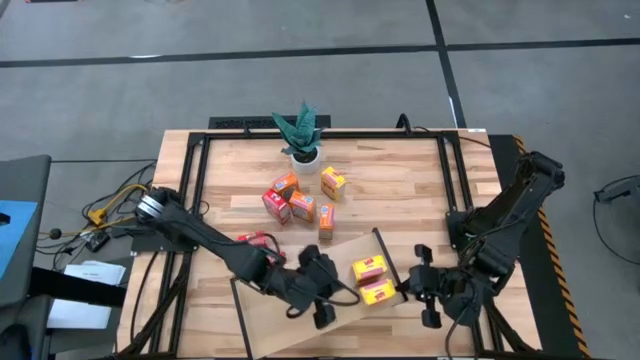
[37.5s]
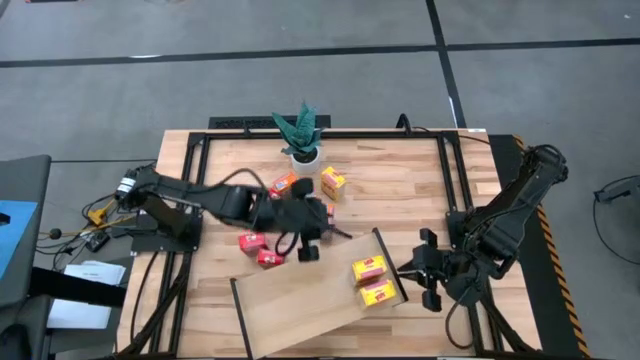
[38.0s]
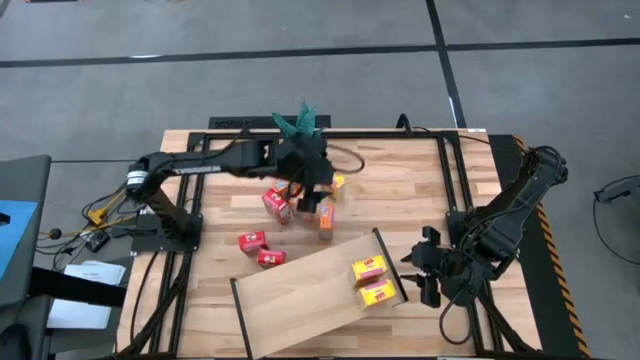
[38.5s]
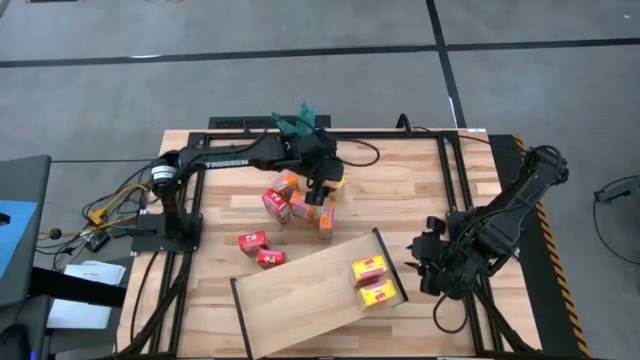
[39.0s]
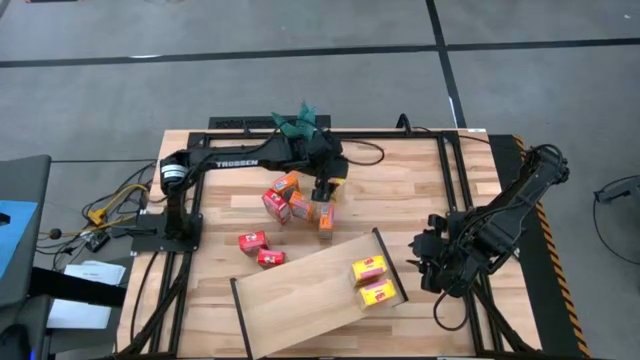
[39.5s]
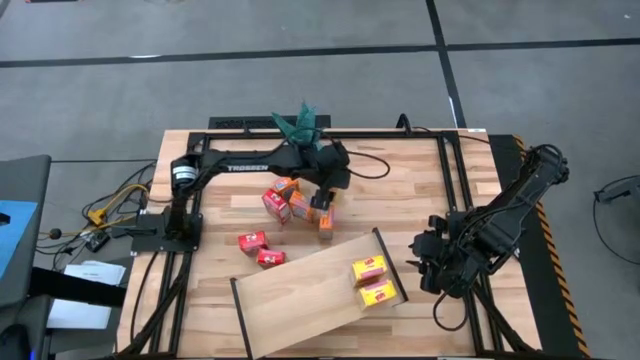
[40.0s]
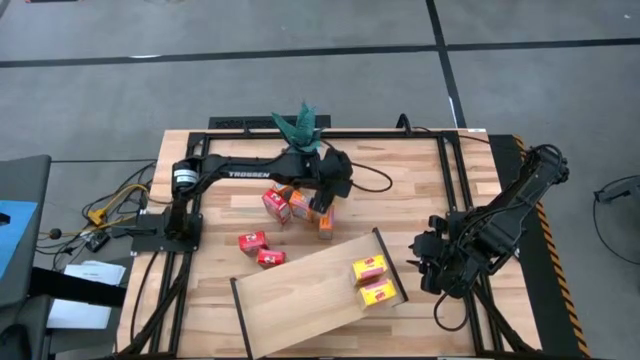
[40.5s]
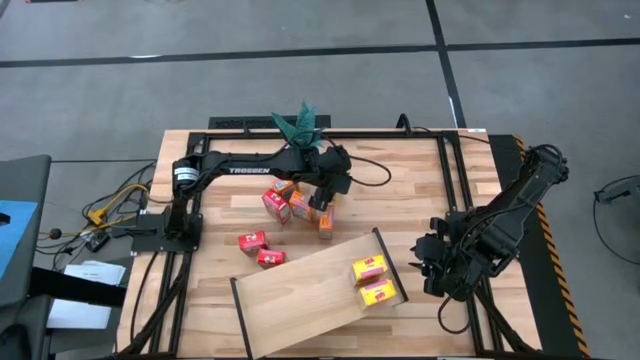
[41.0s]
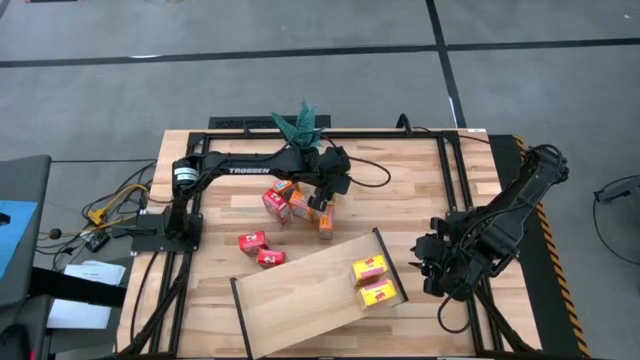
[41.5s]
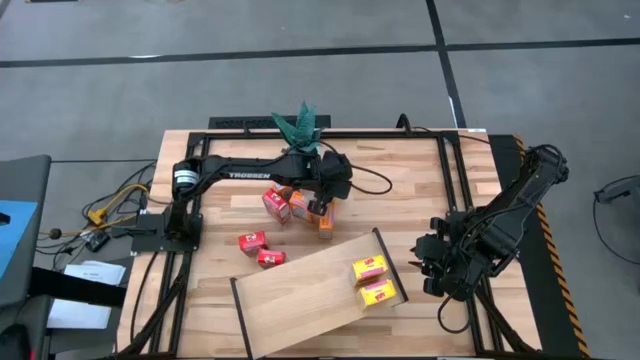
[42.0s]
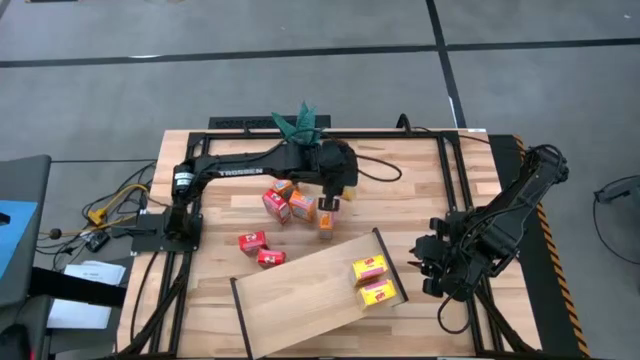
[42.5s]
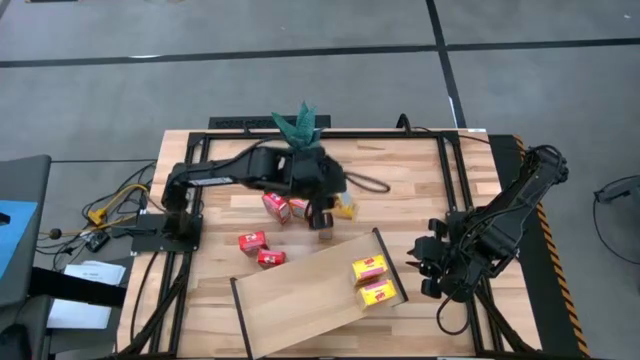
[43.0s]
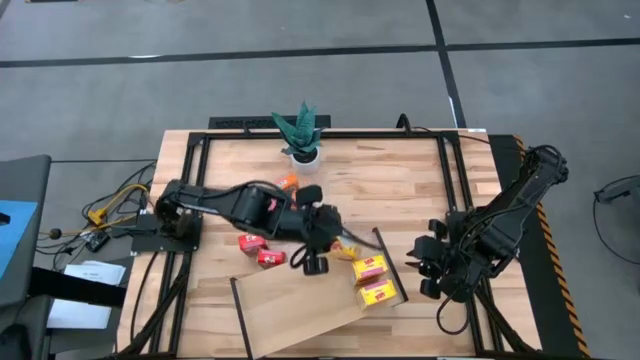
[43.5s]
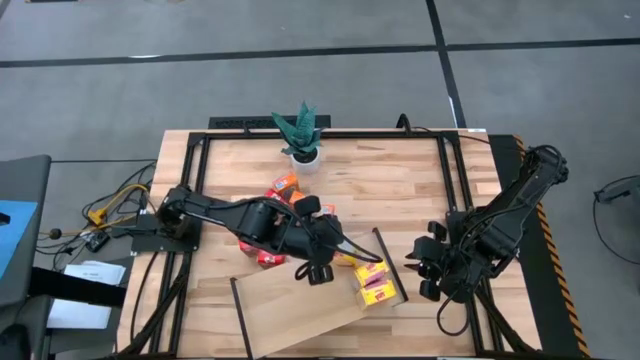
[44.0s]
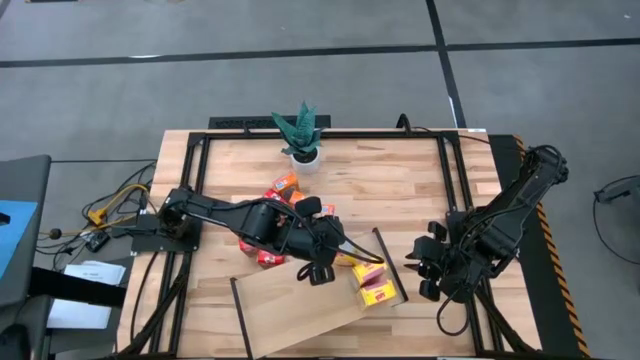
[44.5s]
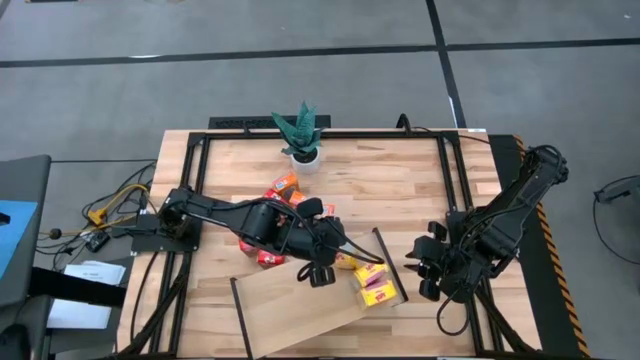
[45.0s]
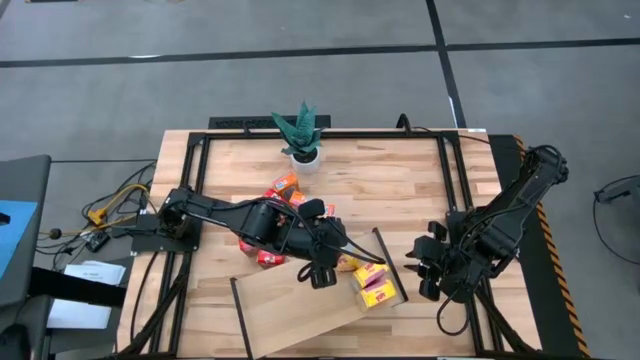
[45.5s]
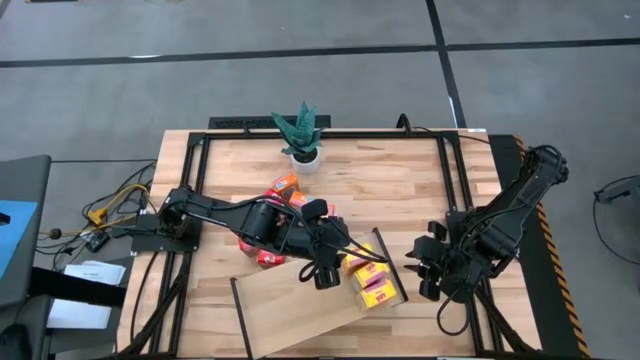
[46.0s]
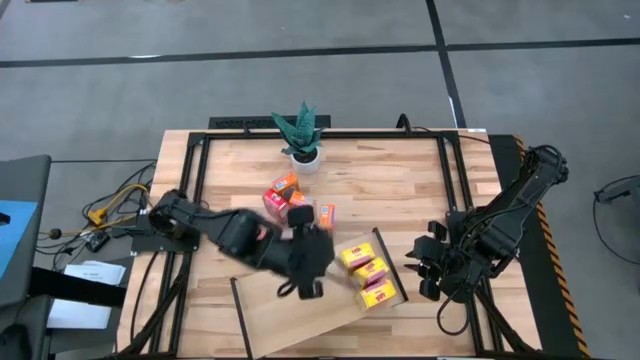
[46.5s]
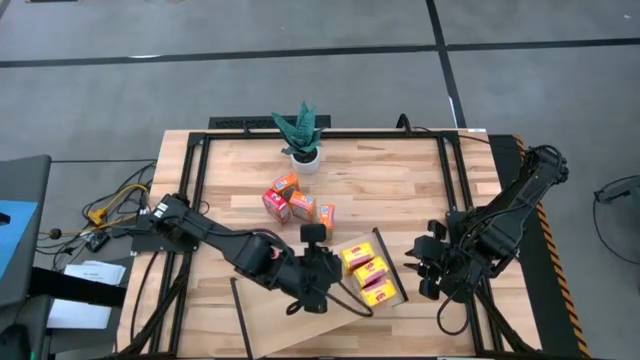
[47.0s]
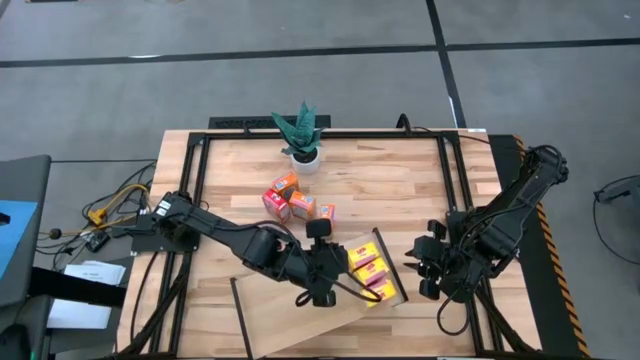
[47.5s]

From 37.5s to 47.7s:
Task: Stack cereal on shelf
Put the yellow cereal box on the shelf aligned with the yellow cereal boxes

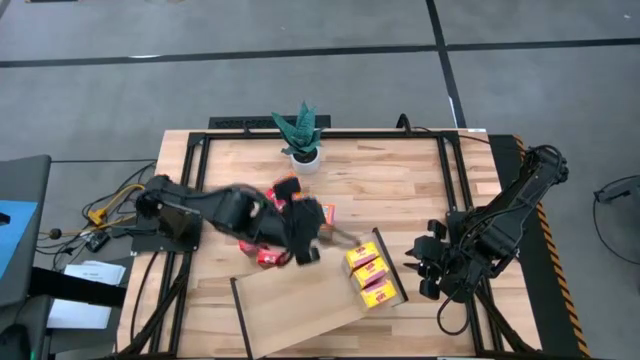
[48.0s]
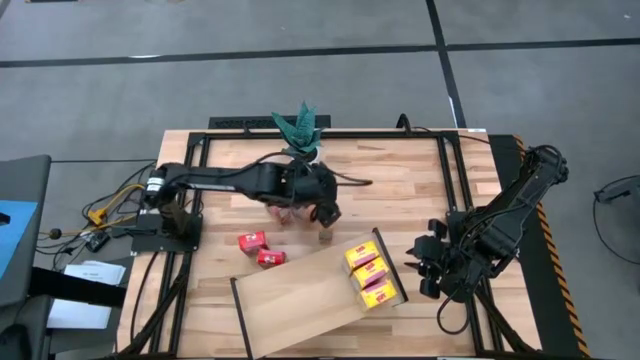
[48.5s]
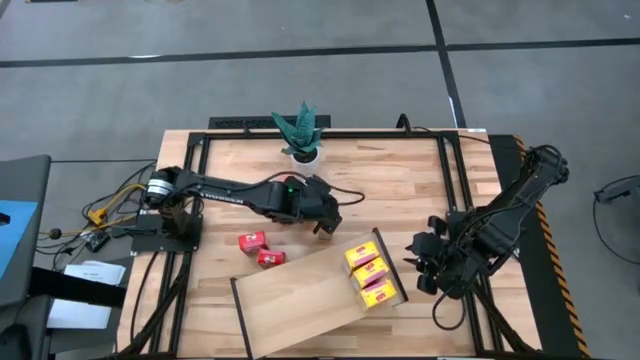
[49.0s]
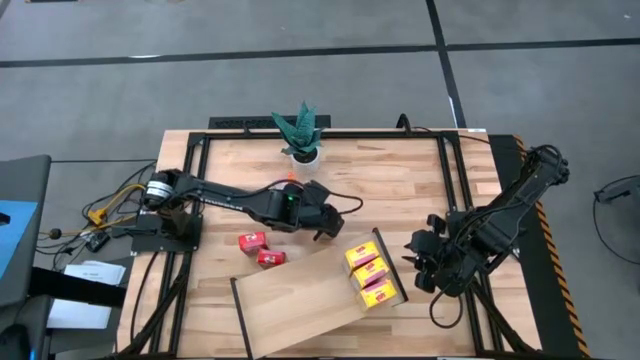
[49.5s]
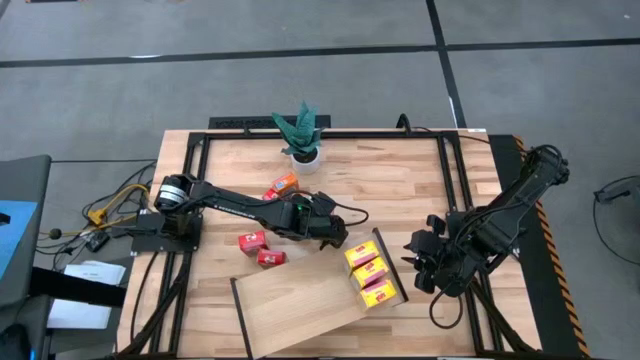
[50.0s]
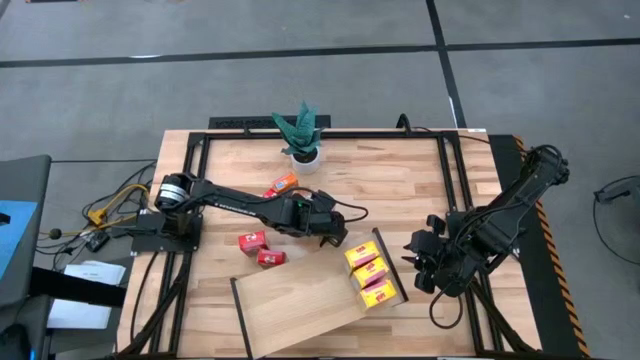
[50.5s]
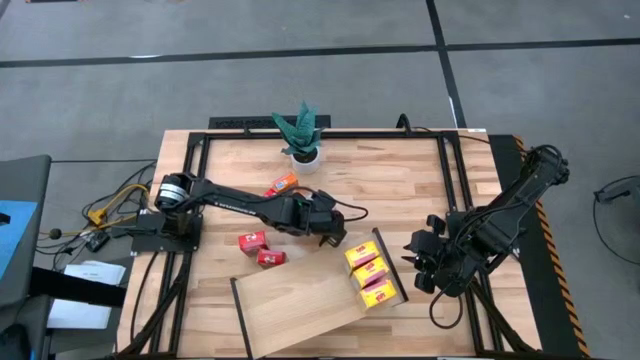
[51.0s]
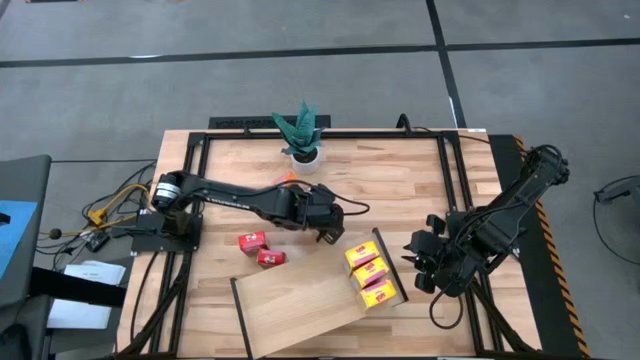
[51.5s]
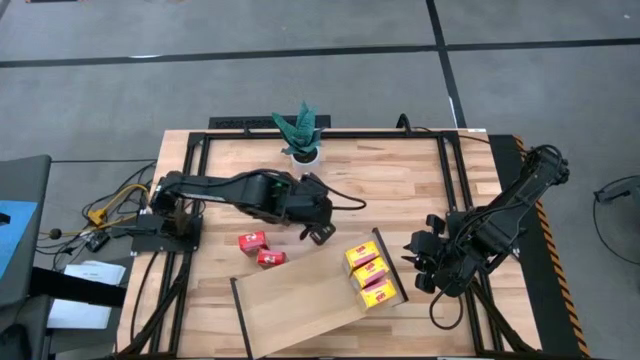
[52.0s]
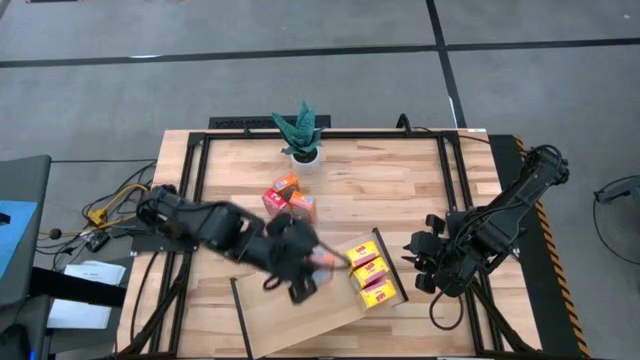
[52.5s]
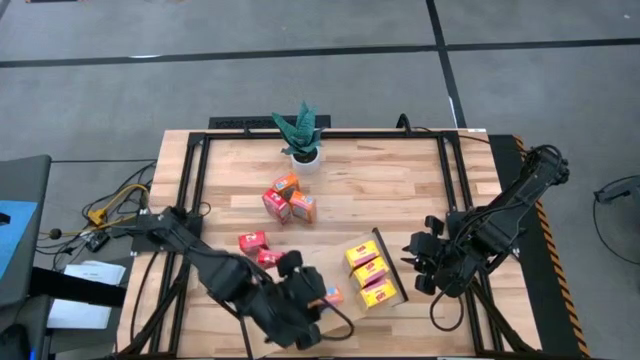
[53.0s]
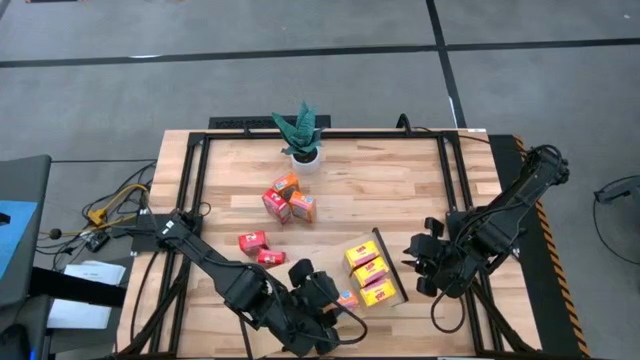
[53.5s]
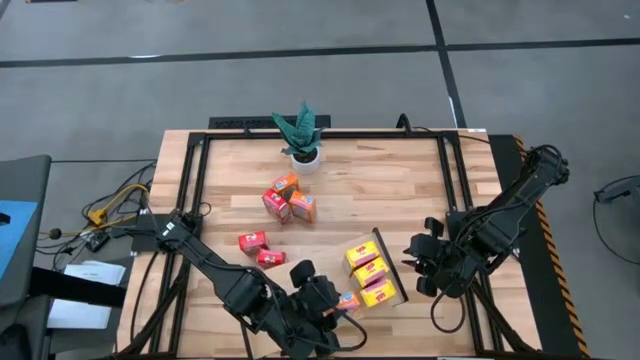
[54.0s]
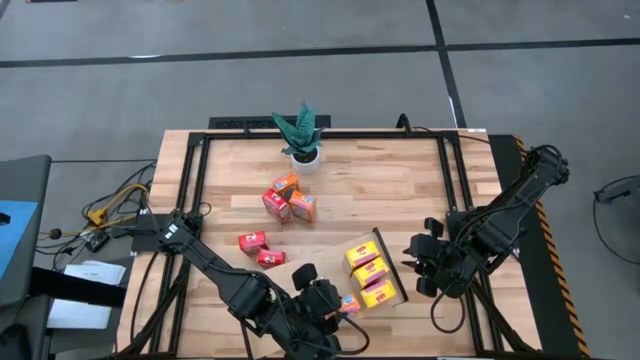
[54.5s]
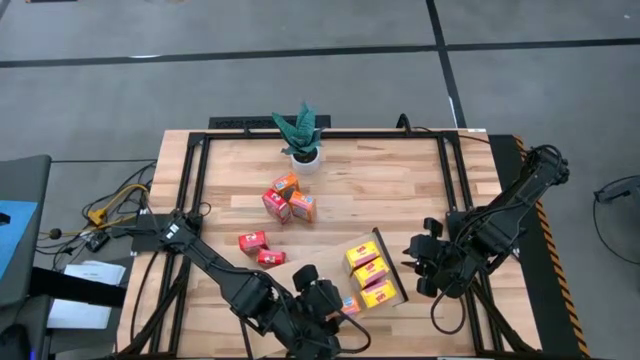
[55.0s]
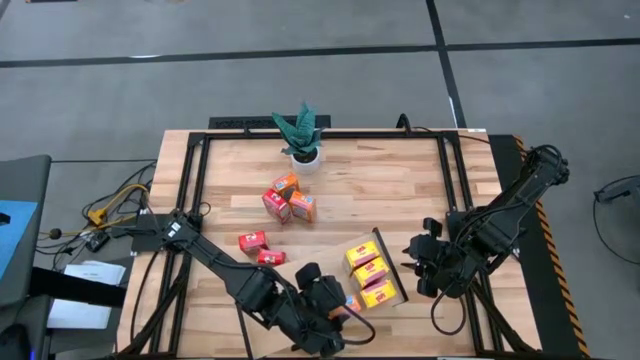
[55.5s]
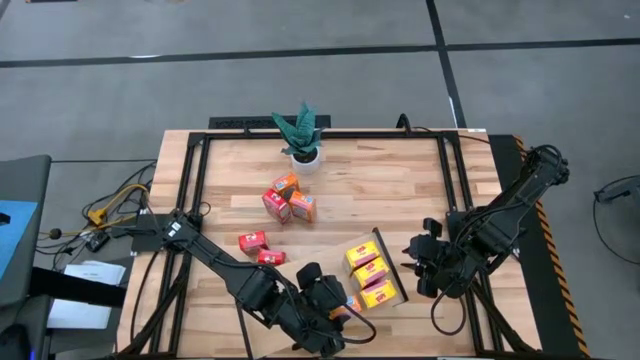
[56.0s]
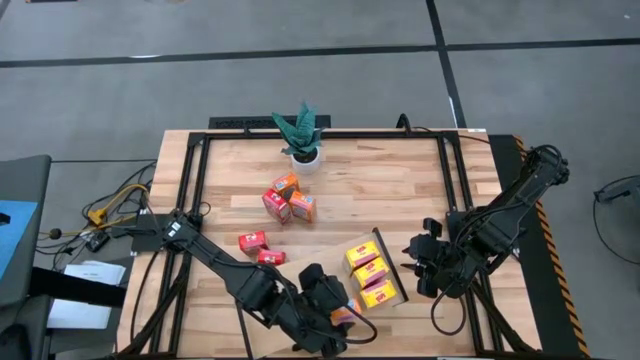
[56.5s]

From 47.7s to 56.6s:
Put the bottom right orange cereal box on the shelf

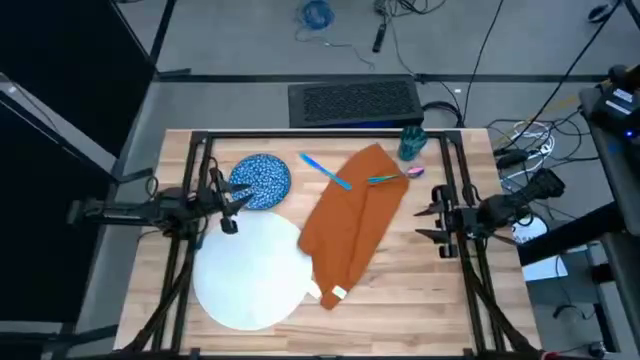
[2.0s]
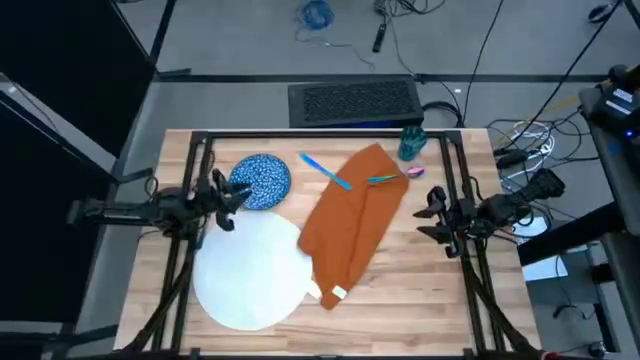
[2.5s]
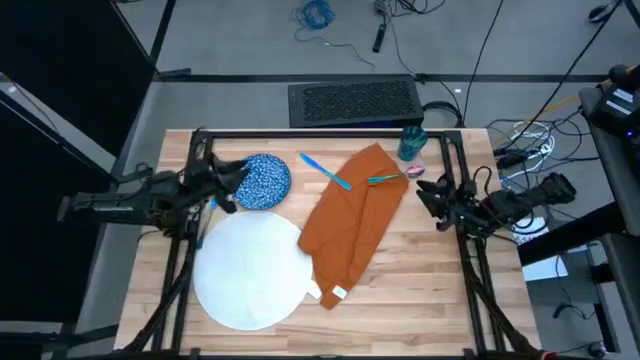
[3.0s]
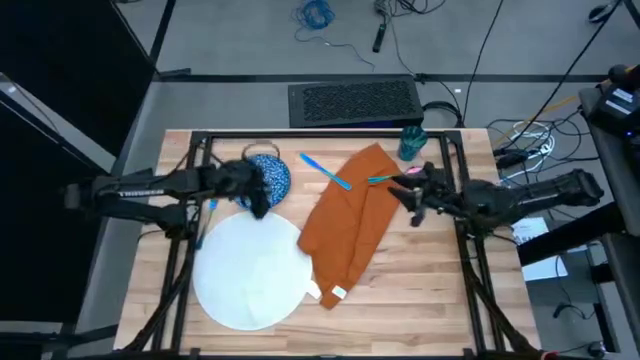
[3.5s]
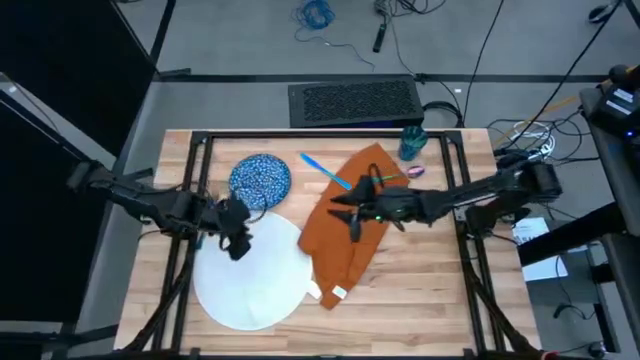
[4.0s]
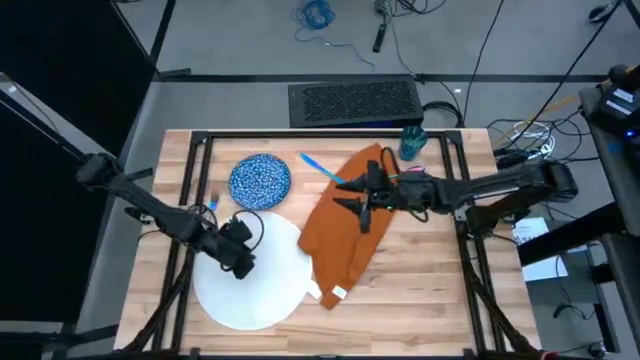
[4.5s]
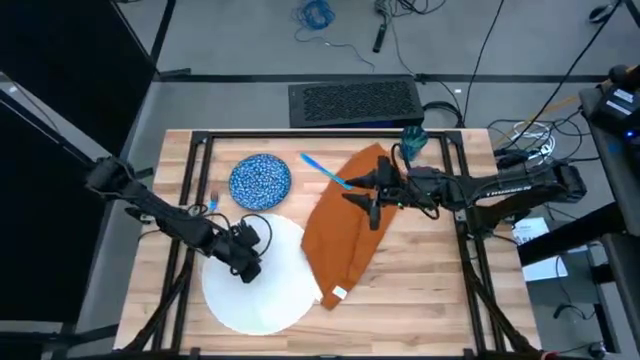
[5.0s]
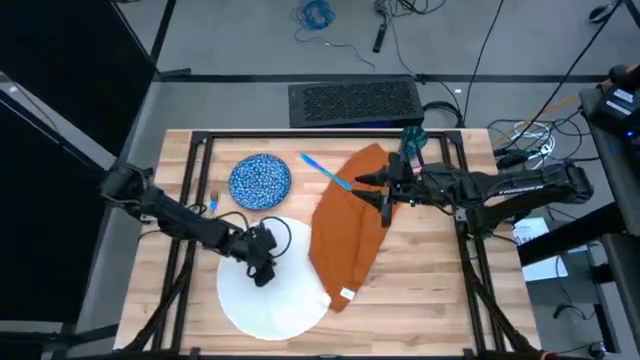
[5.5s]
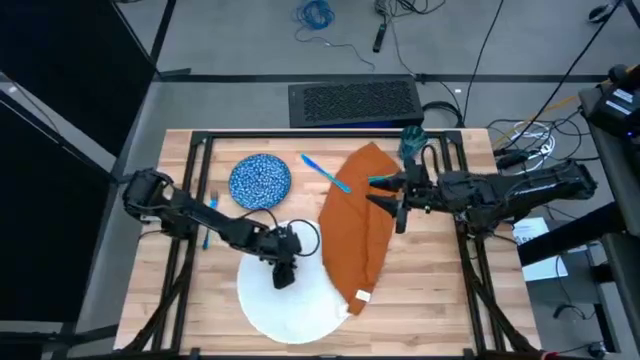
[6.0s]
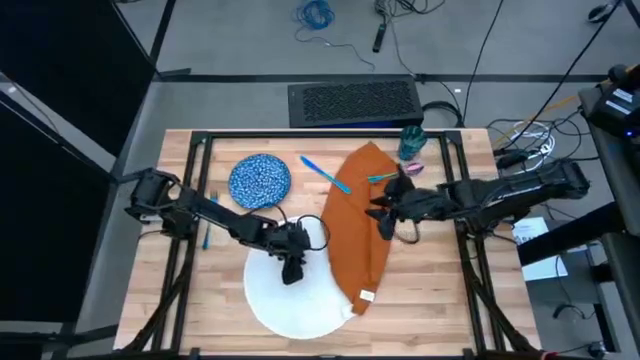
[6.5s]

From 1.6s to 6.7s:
Task: Set table place
Move the white table mat to the center of the table
